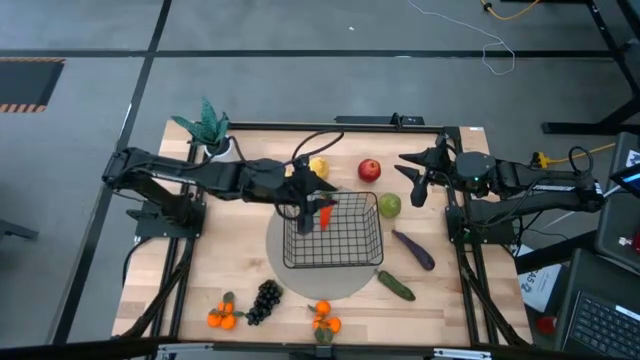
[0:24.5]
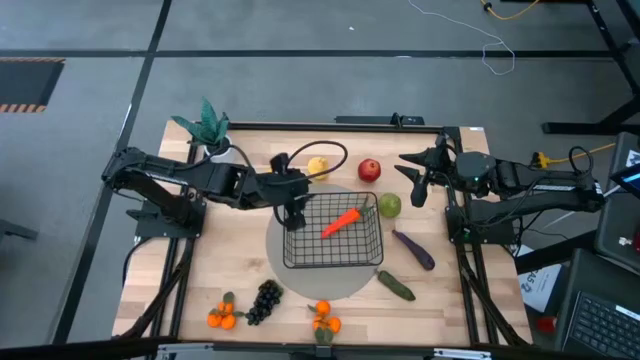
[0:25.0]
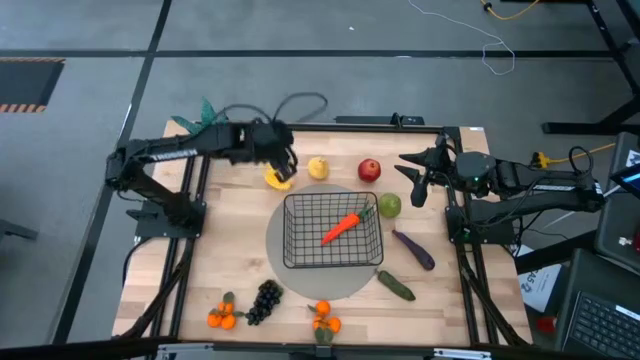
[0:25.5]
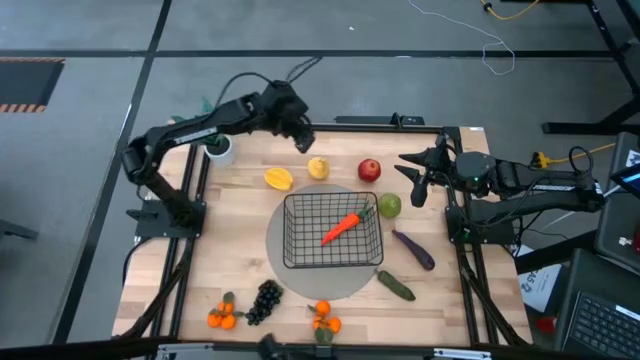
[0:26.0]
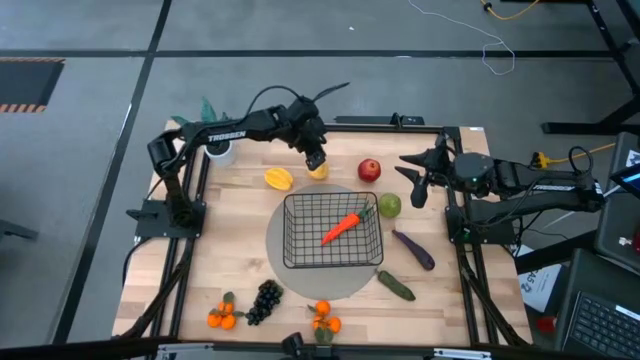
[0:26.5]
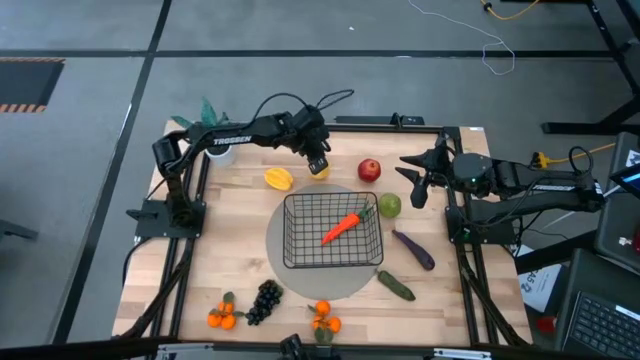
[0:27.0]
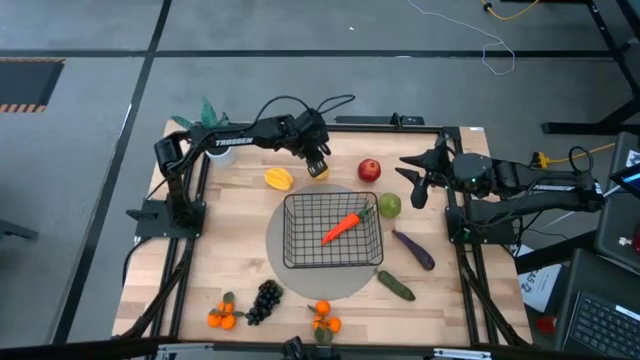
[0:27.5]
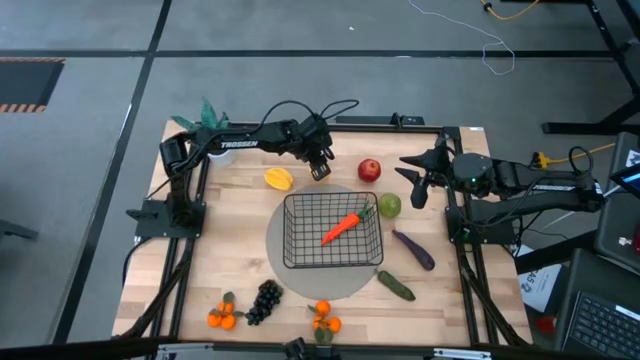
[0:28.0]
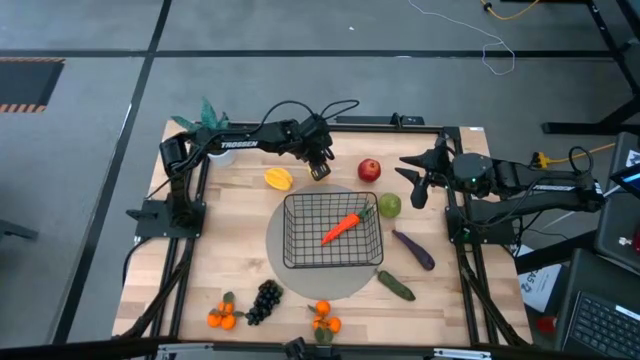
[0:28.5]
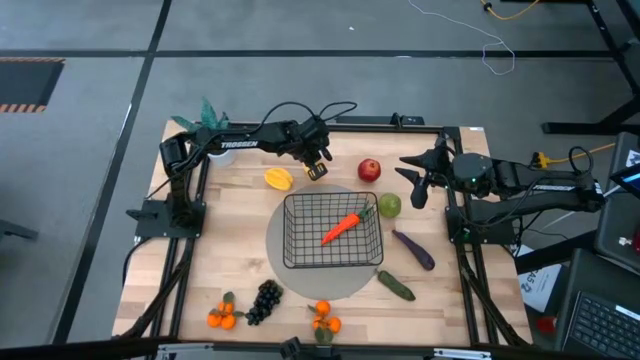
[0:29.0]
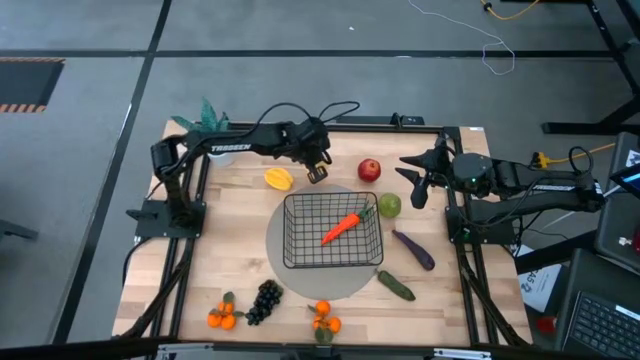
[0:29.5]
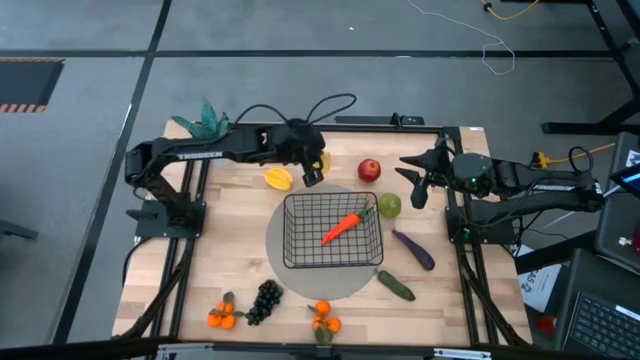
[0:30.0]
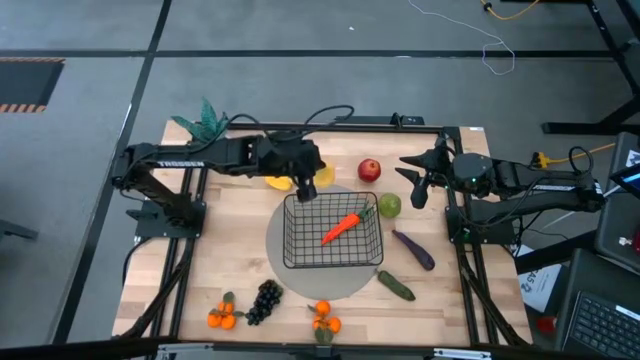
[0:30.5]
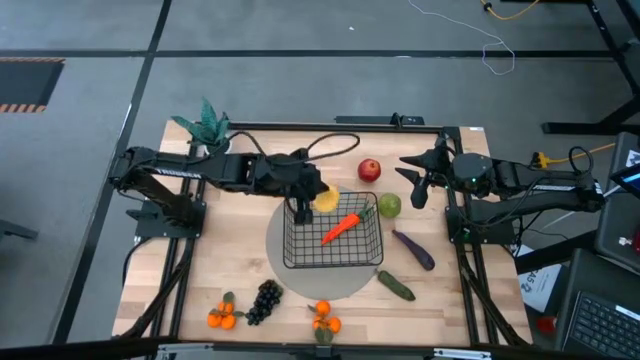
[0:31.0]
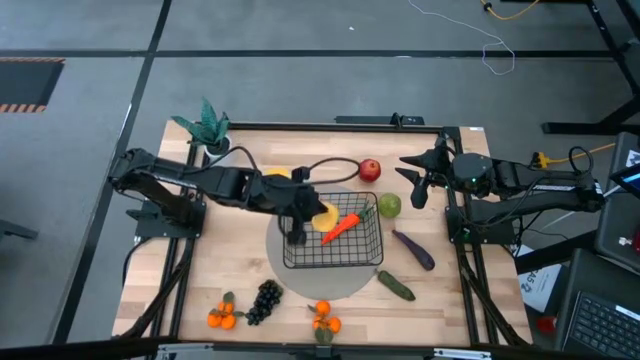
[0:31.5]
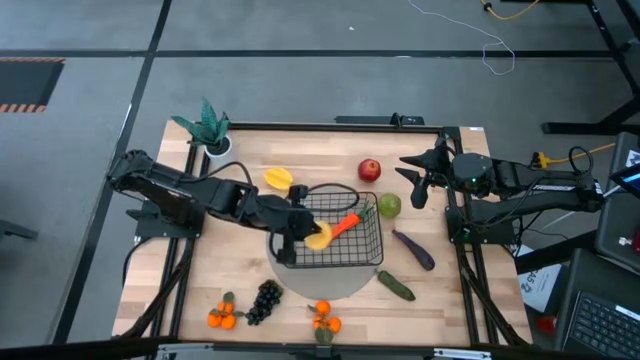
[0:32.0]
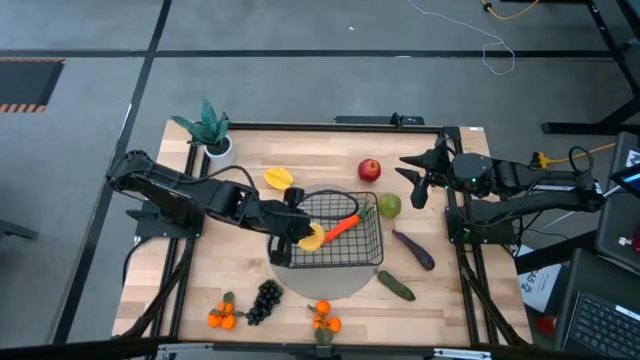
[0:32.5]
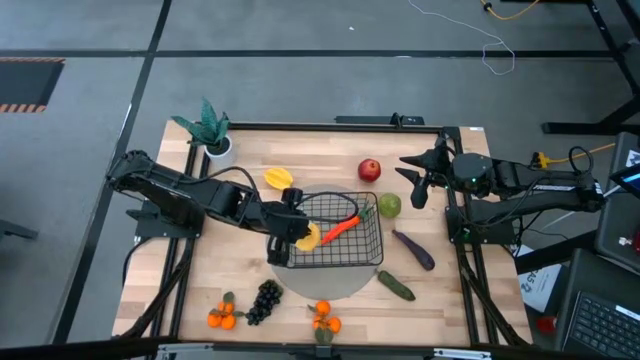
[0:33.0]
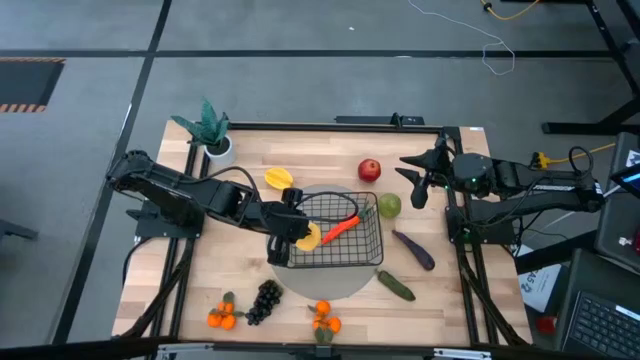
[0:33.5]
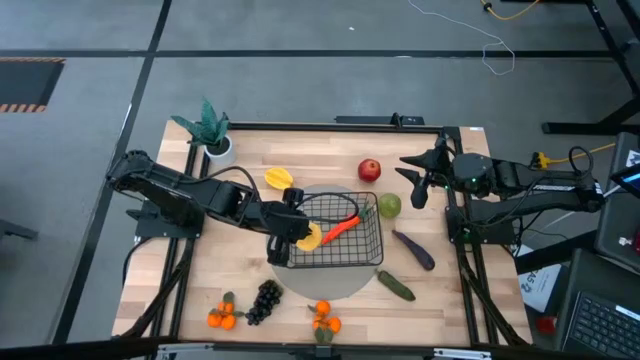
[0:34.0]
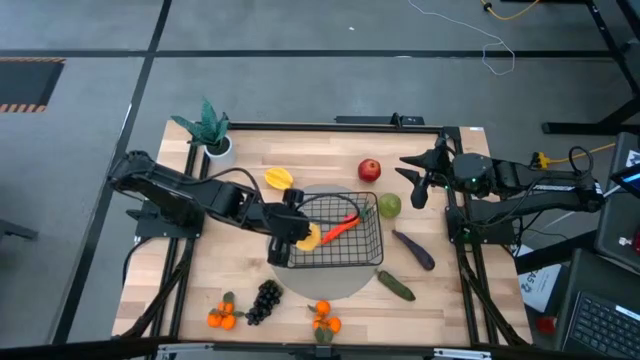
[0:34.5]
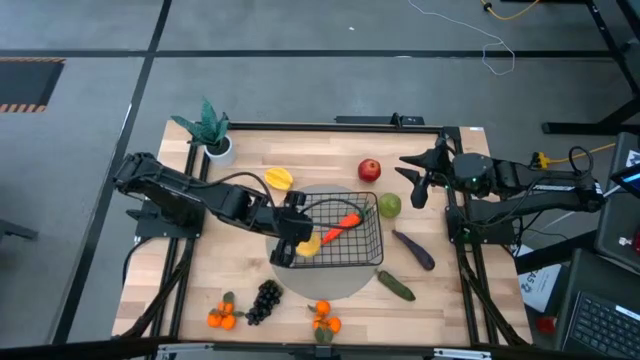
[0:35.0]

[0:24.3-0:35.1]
Task: Build produce basket
Put the yellow pear into the wire basket

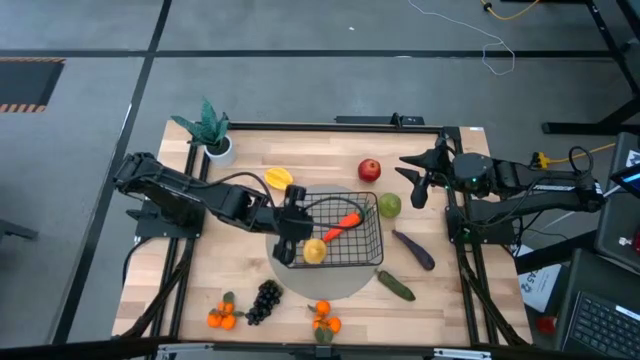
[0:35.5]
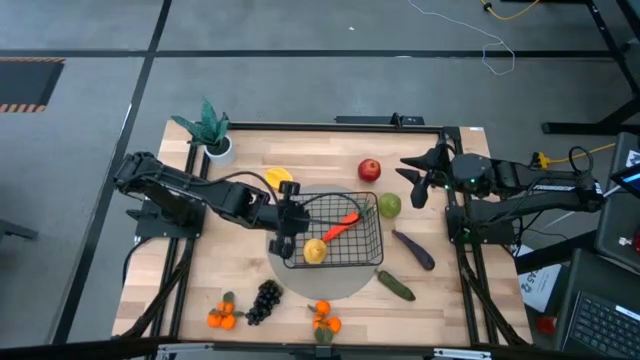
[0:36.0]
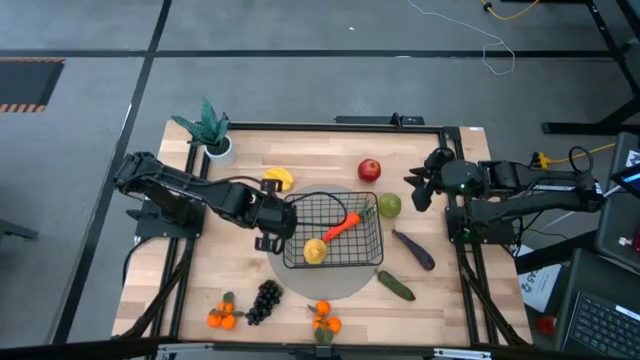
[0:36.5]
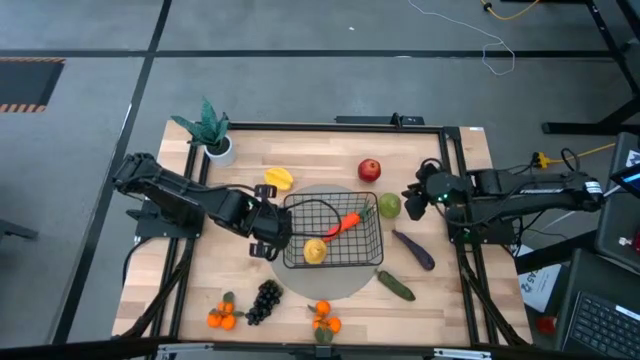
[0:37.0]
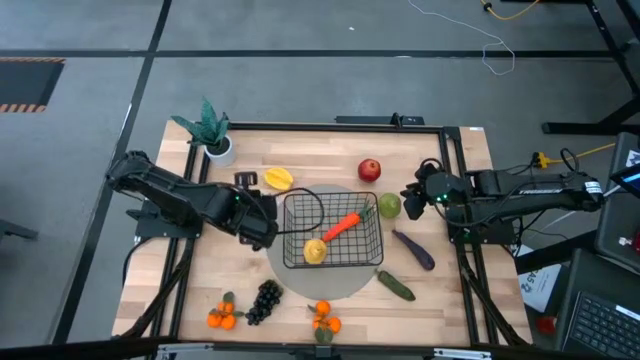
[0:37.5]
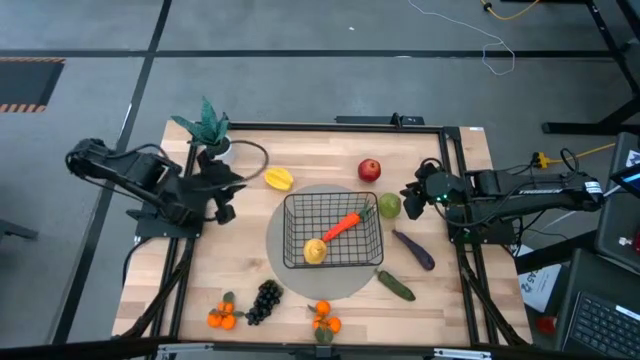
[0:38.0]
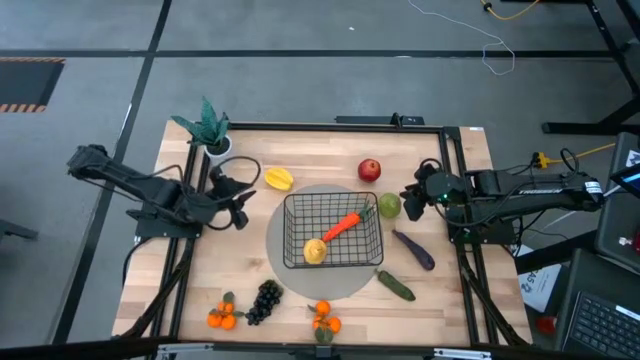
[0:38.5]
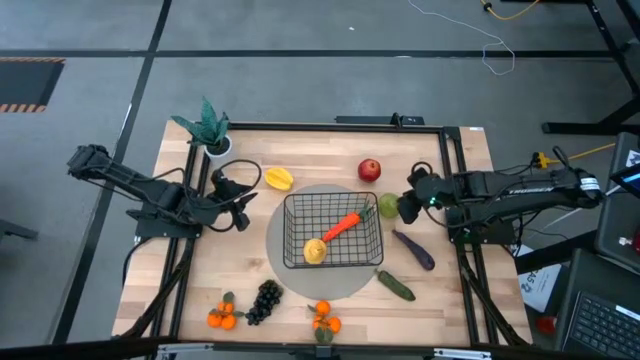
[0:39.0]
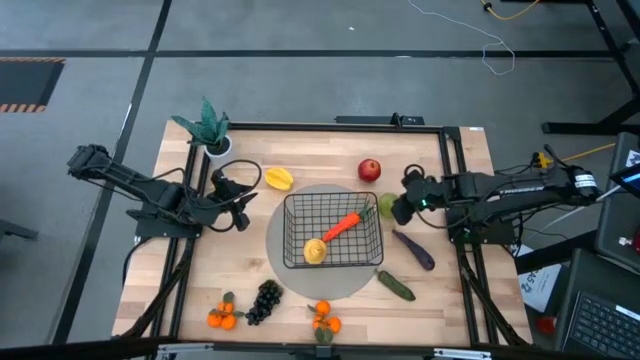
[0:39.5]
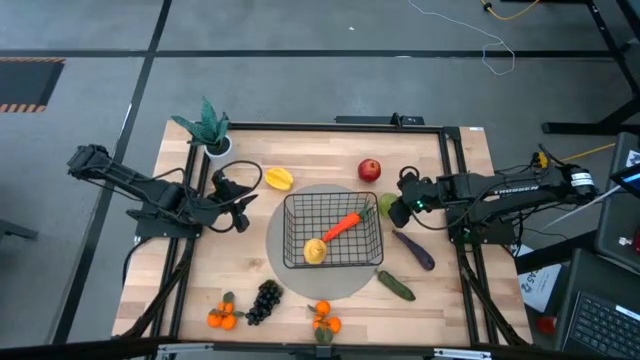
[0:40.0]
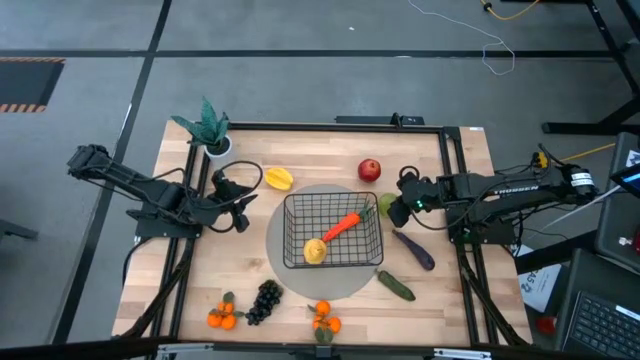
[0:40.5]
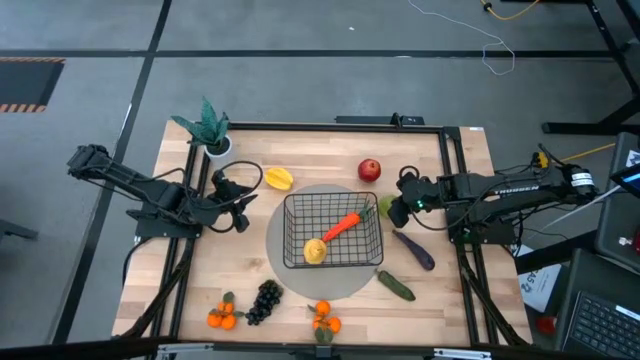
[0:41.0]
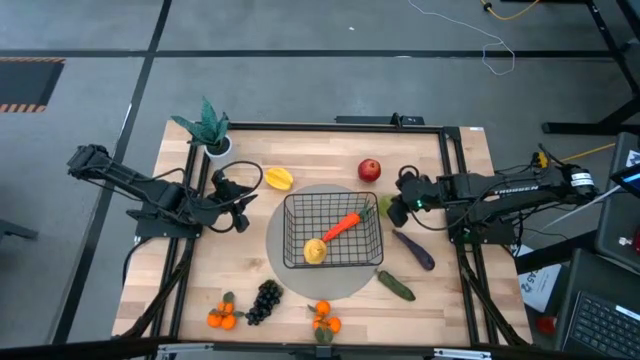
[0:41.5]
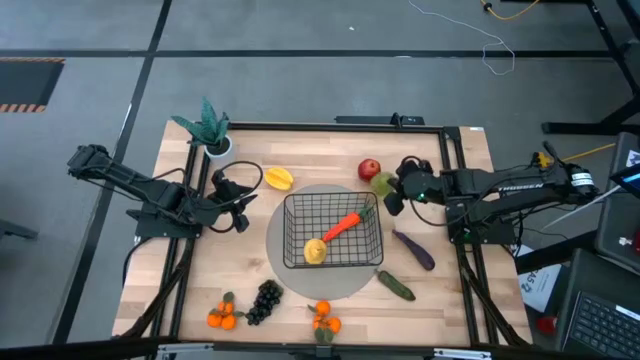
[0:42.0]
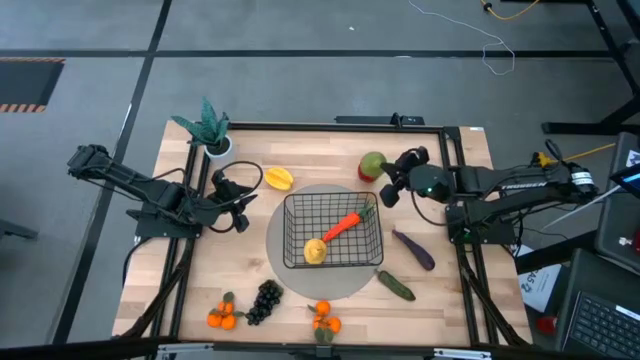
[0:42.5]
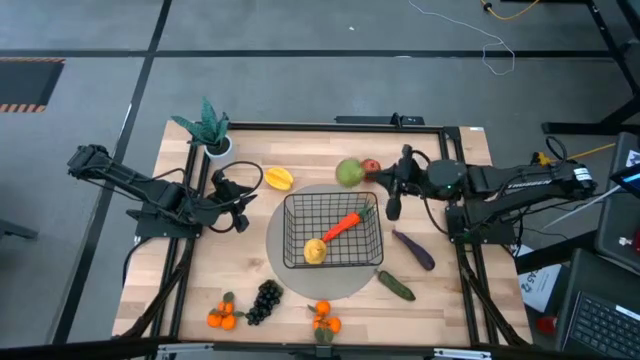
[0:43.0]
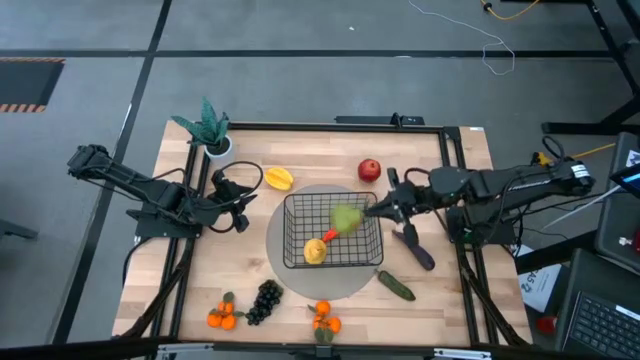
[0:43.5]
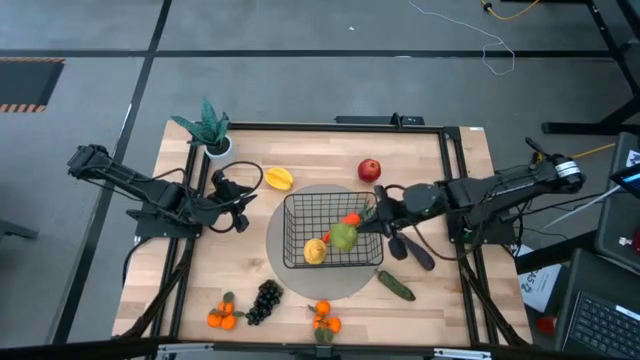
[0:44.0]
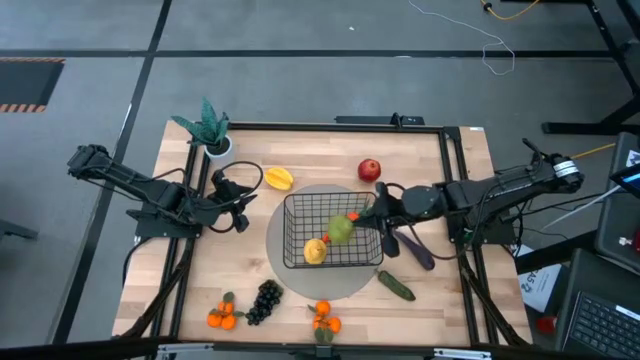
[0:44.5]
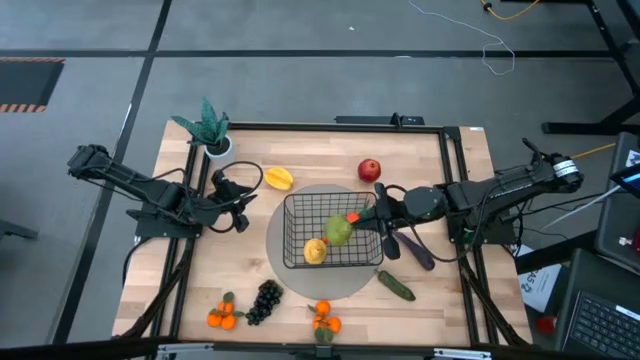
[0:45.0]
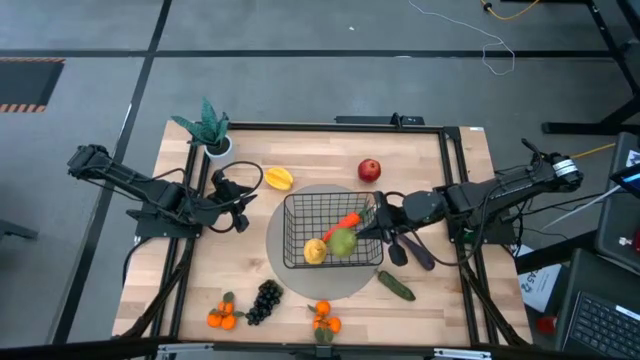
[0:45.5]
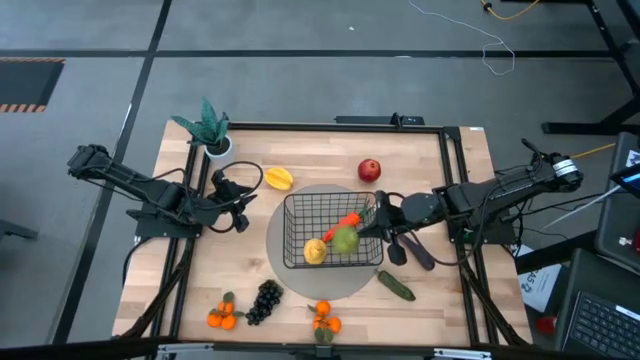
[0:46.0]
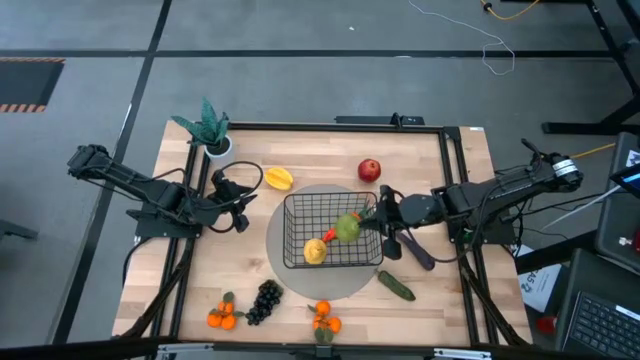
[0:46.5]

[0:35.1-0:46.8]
Put the green pear into the wire basket
